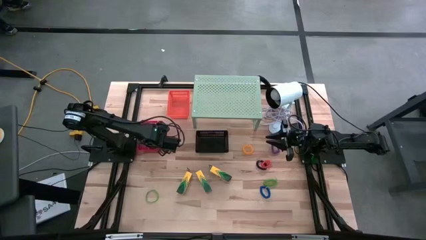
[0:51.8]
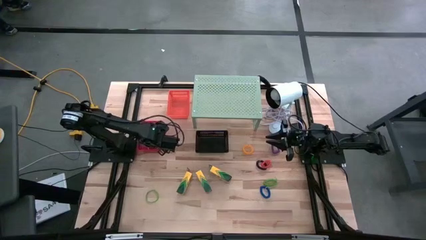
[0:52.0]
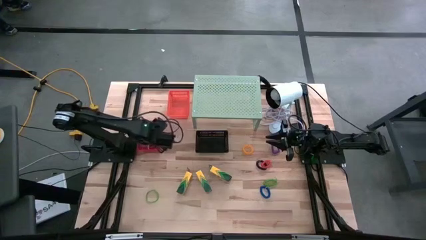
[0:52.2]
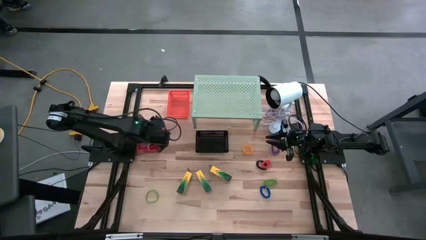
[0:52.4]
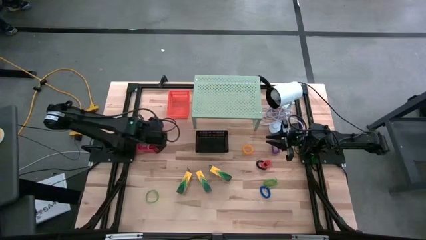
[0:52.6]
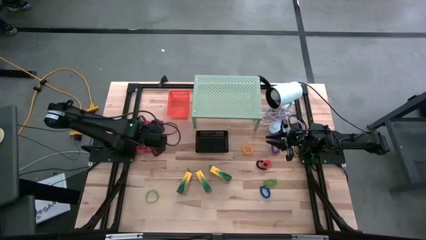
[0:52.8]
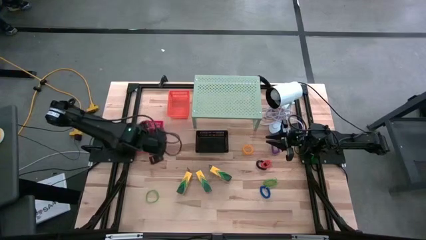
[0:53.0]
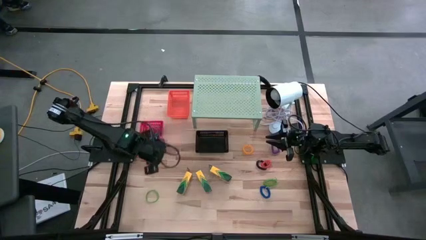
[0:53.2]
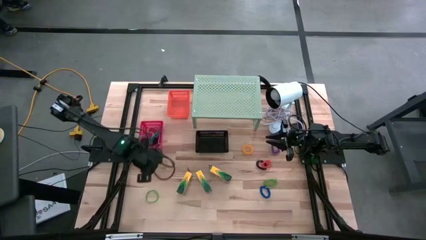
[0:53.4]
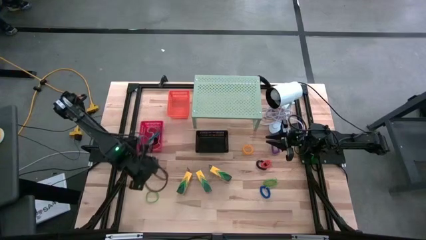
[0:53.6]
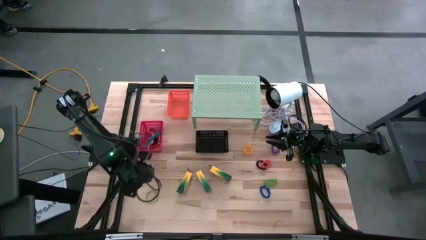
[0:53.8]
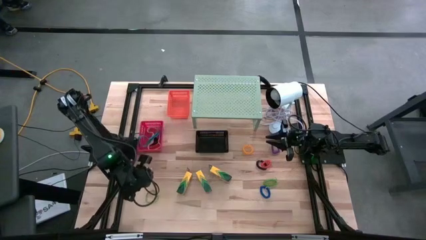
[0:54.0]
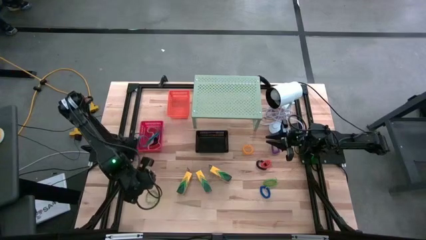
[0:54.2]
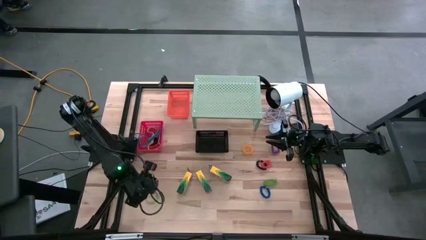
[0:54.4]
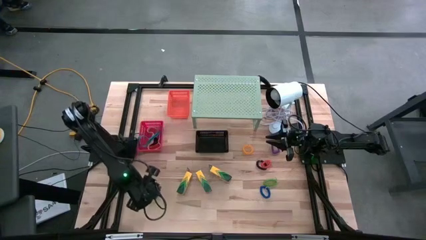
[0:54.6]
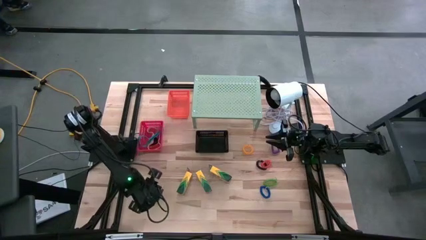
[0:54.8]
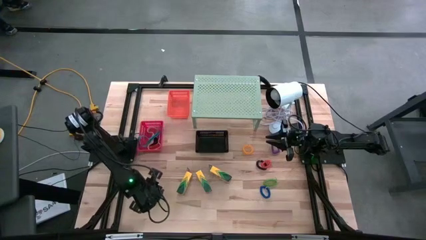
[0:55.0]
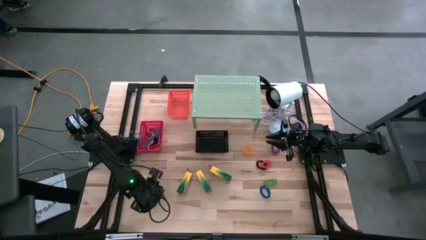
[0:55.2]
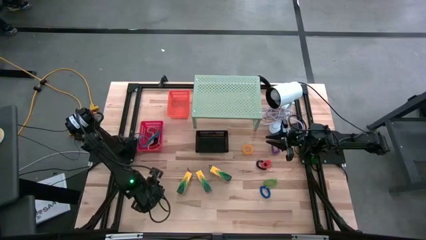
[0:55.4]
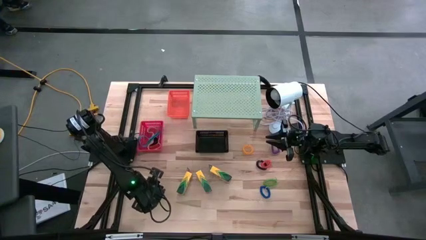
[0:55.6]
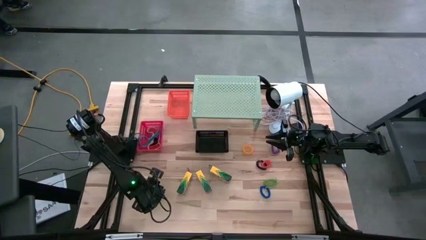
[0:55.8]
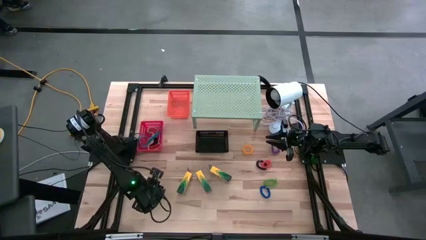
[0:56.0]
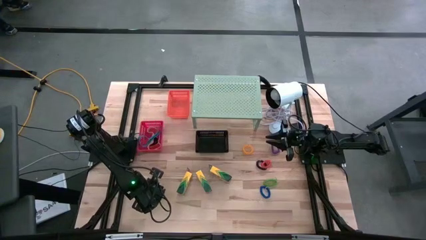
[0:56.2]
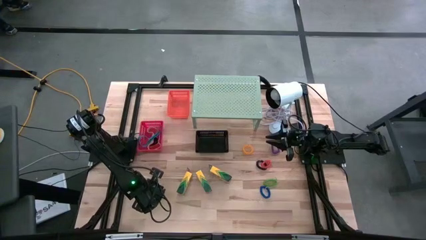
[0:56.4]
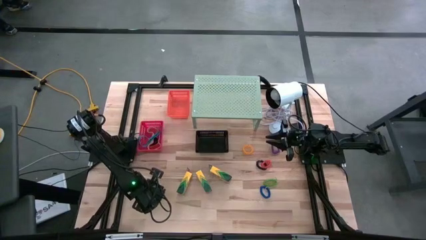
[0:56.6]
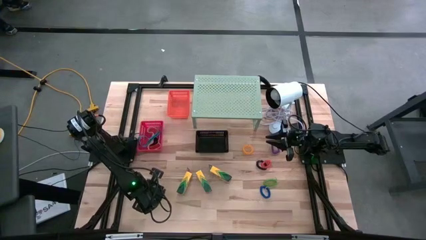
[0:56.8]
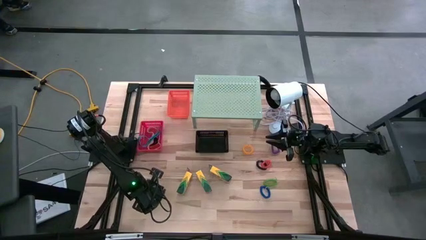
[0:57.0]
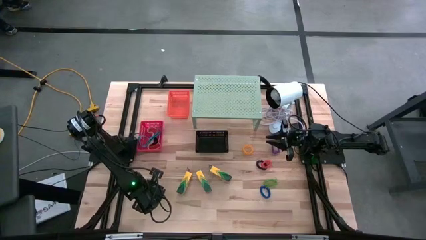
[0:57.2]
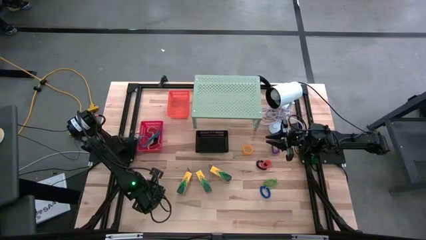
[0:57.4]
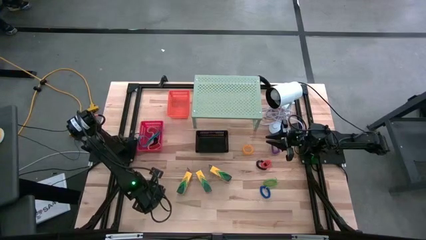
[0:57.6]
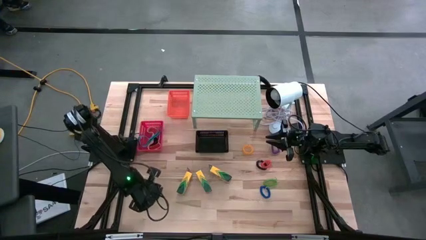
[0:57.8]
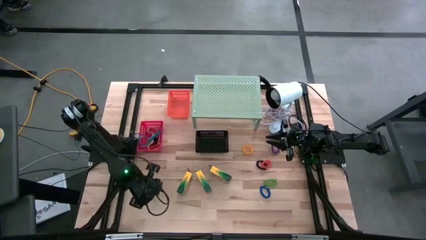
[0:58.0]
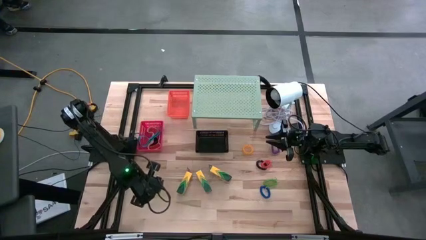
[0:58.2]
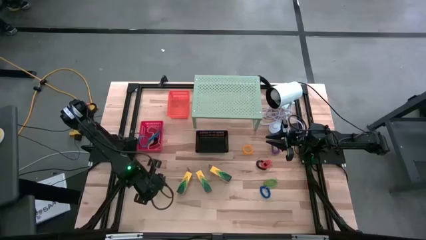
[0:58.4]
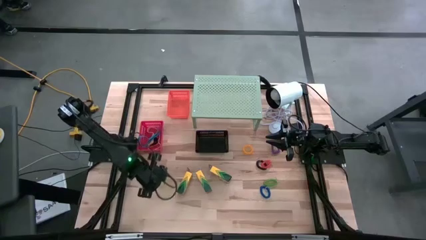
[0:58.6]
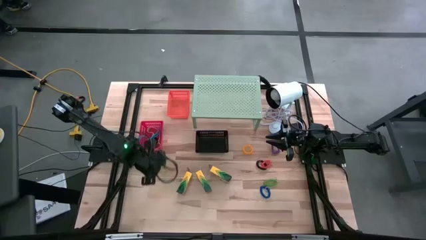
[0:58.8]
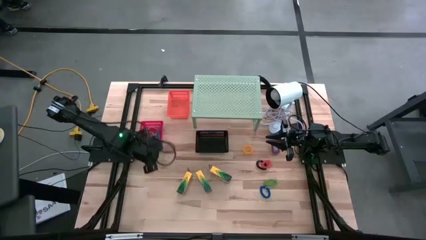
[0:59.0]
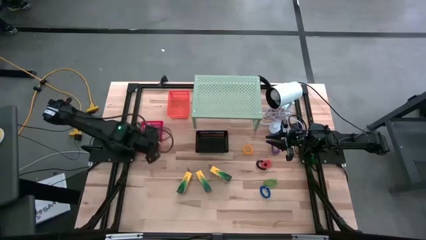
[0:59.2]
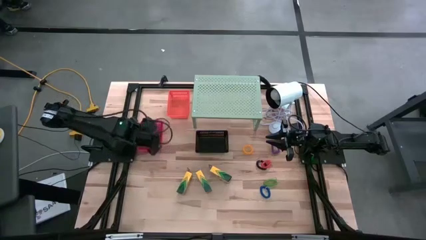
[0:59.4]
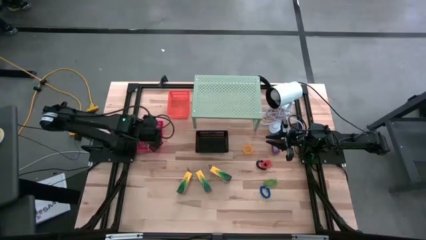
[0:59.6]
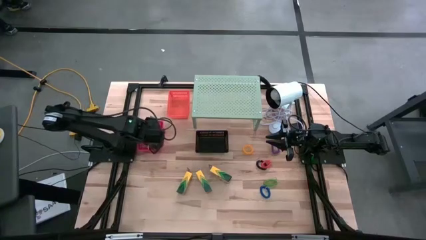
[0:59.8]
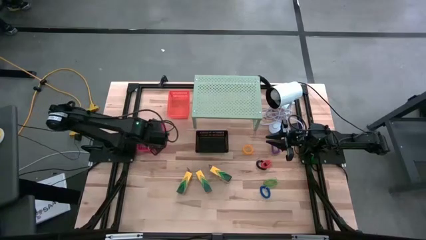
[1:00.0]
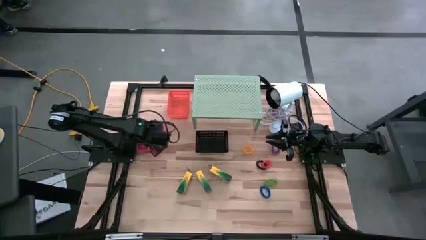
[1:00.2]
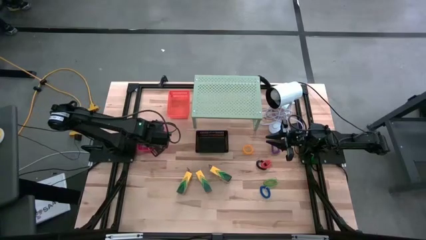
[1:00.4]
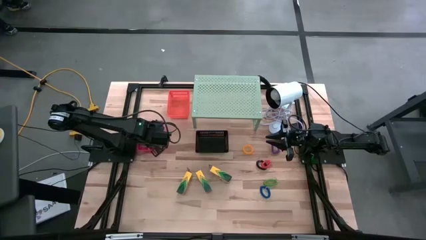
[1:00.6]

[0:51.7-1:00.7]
Task: Pick & Place Office Desk Supplies
Put the green rubber band into the orange bin on the shelf

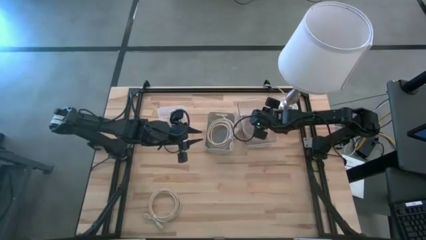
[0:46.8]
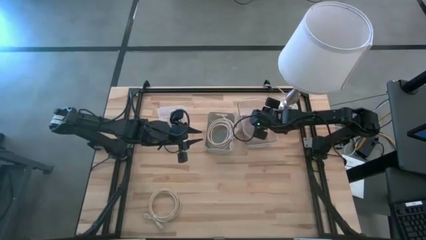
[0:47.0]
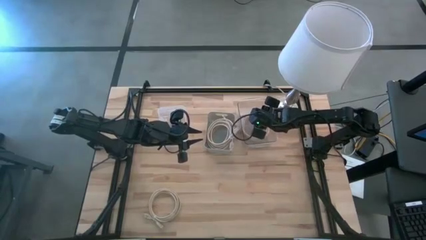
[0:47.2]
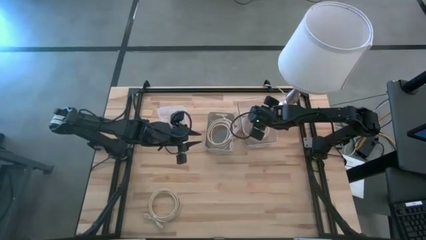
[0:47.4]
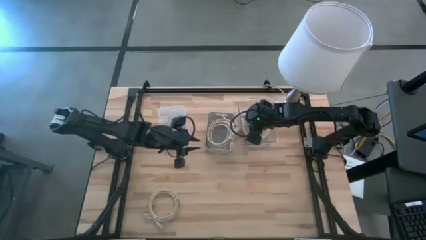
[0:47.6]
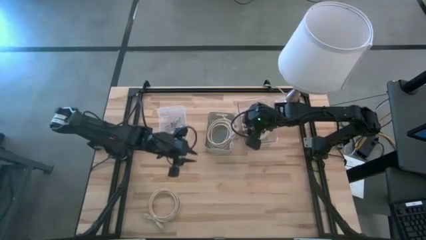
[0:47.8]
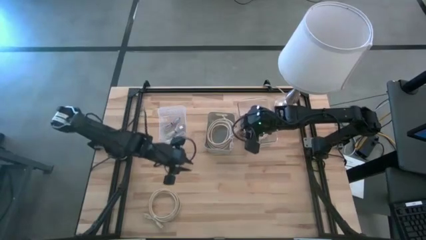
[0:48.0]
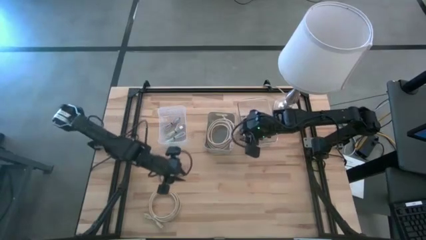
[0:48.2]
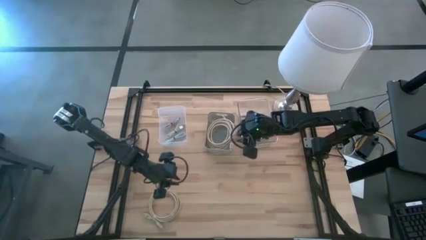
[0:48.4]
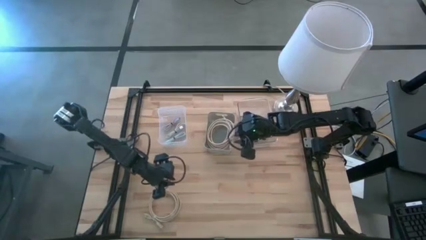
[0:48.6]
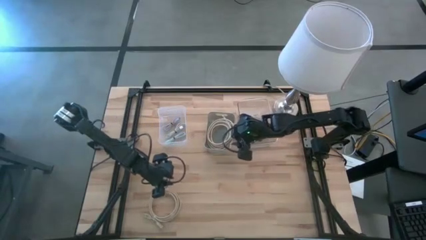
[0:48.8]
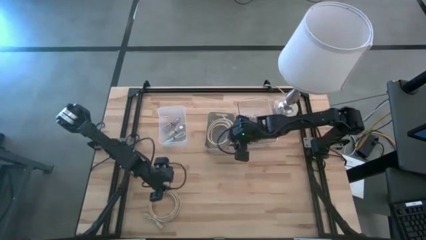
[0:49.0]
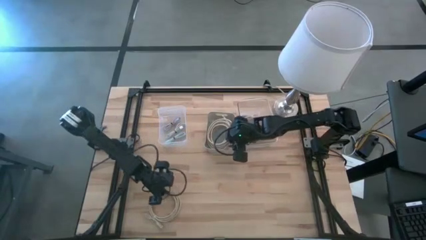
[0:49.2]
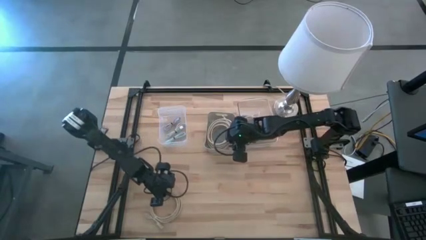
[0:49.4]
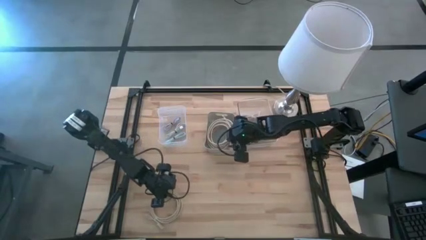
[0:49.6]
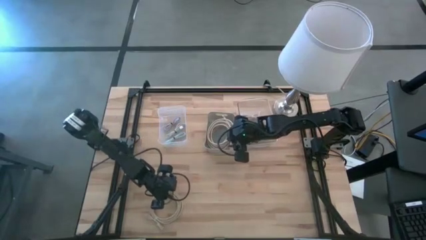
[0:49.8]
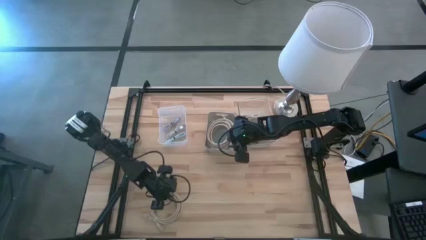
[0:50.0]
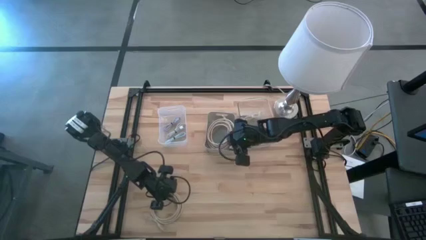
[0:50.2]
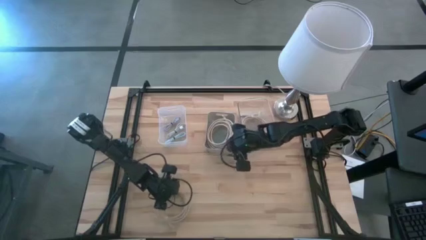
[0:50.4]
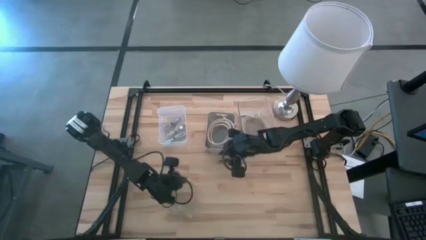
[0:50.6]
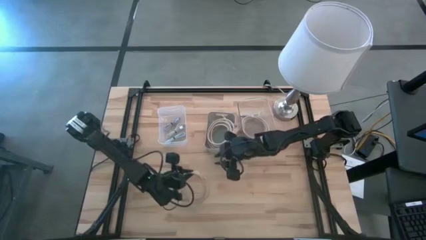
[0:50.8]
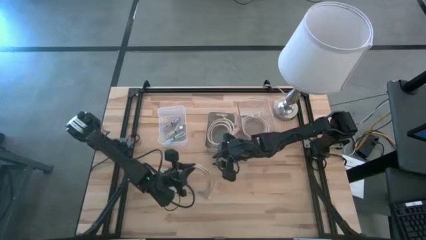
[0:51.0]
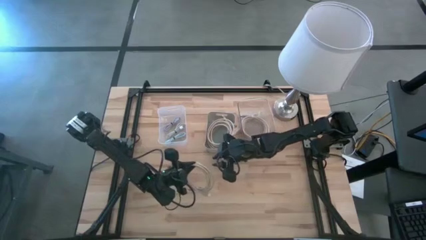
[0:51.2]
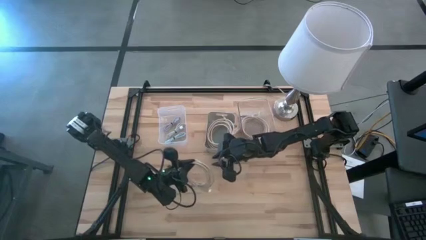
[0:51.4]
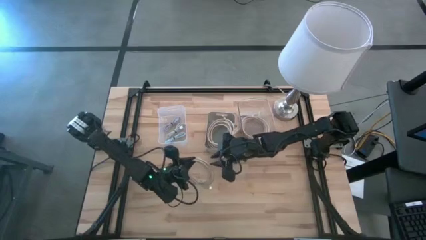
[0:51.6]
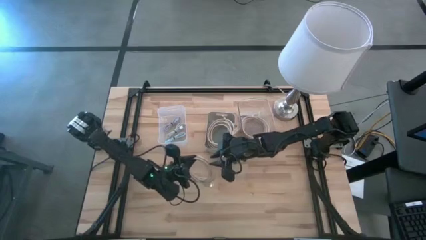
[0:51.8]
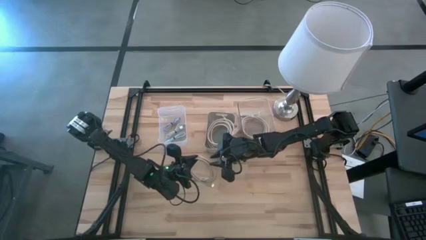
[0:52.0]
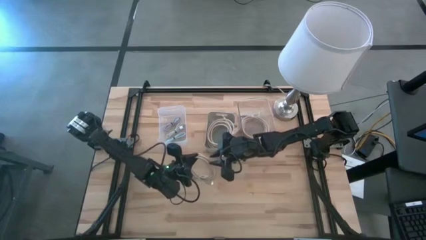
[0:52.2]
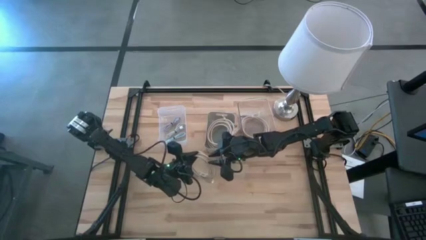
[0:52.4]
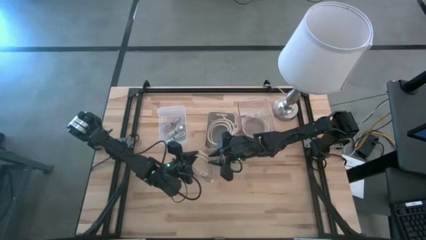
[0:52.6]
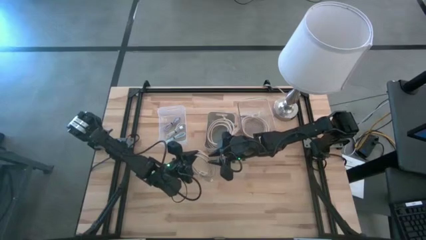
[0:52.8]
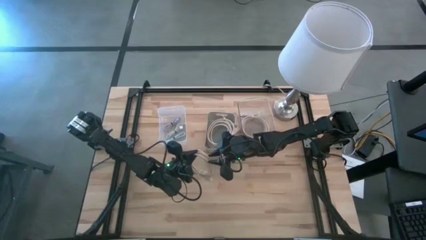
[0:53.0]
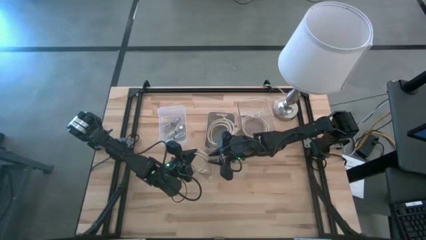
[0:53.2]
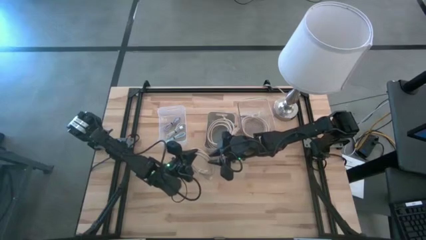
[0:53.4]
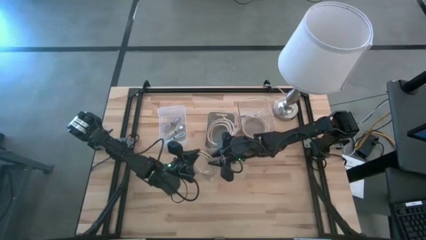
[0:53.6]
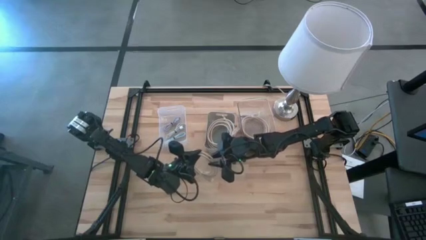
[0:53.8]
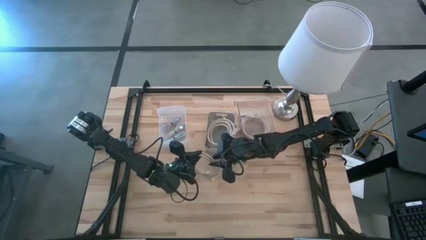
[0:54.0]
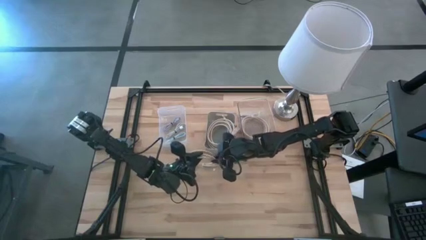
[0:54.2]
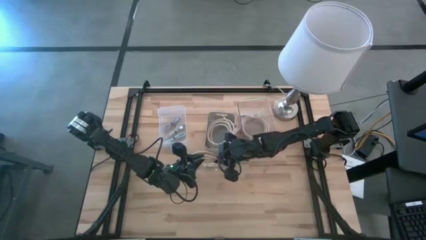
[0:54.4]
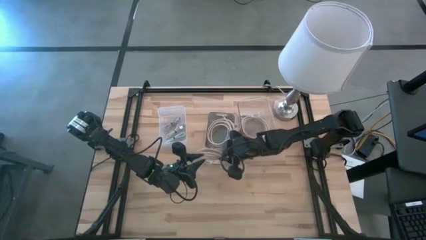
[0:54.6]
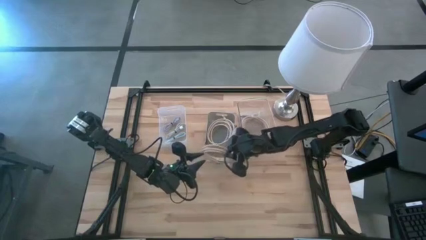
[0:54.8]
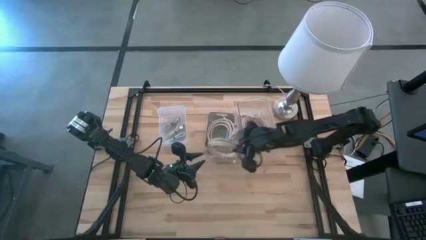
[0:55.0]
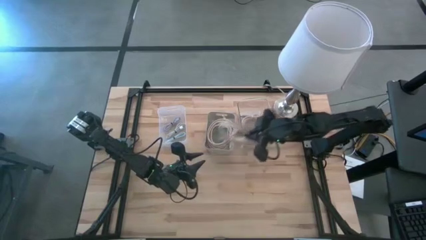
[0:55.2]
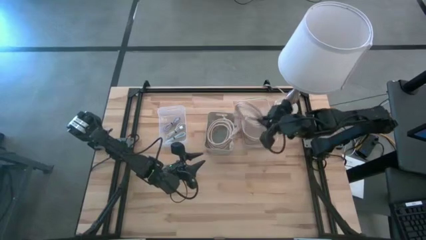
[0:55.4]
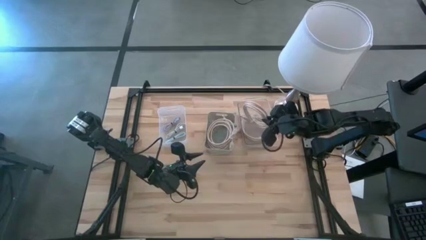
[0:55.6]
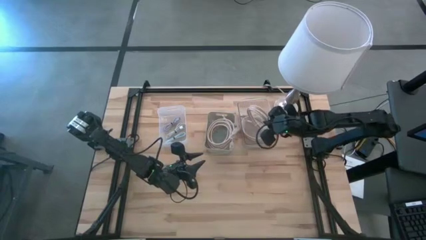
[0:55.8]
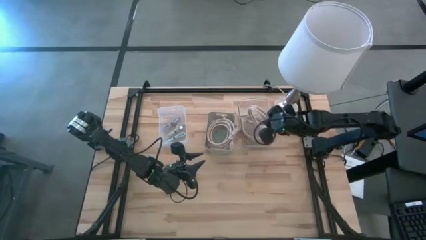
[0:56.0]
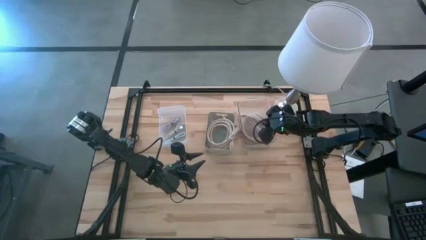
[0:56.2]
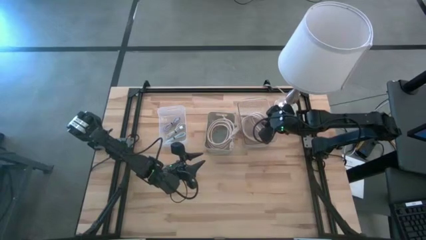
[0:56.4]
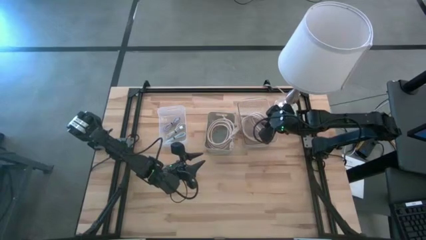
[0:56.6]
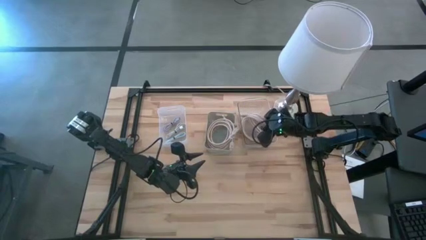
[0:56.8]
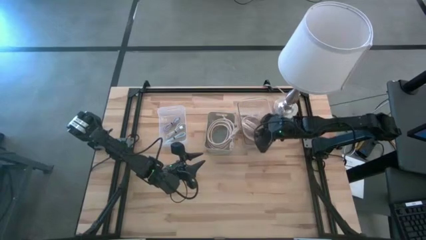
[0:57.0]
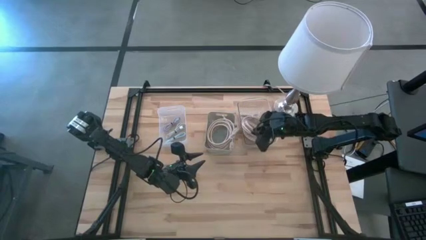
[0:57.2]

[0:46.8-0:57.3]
Task: Pick & Place USB Port
Put the brown hdmi cable into the right transparent bin
